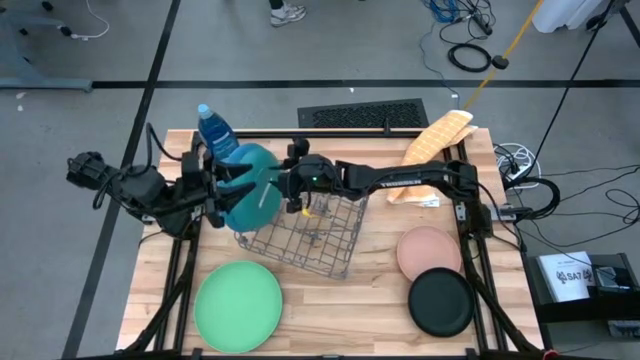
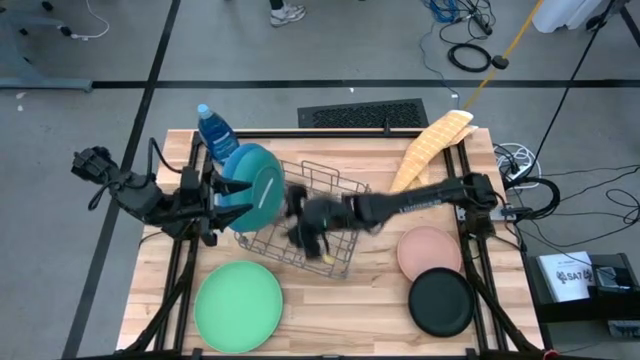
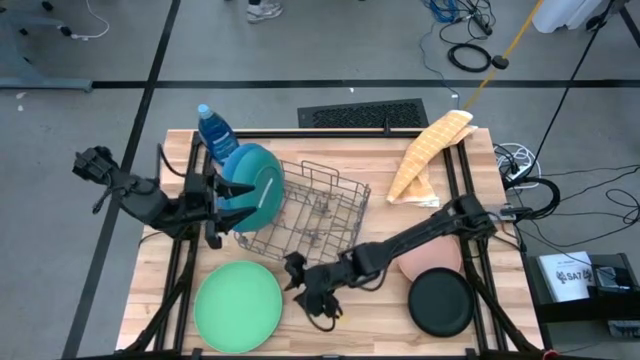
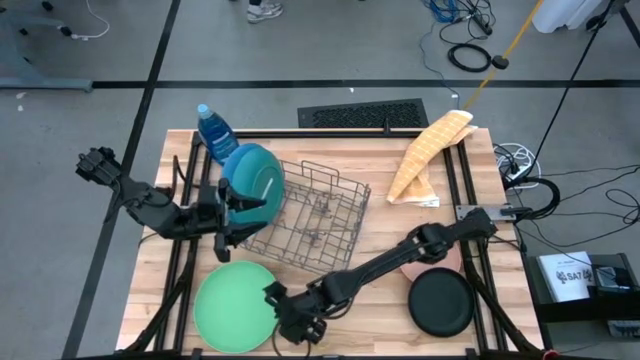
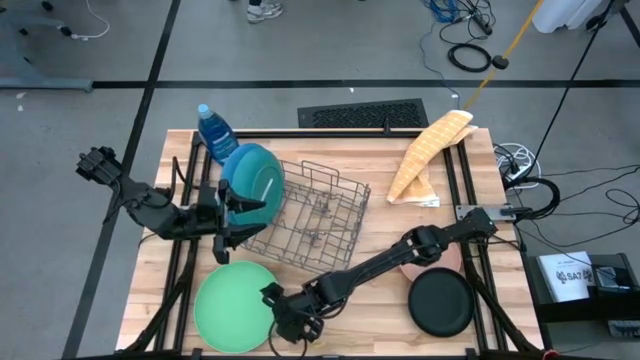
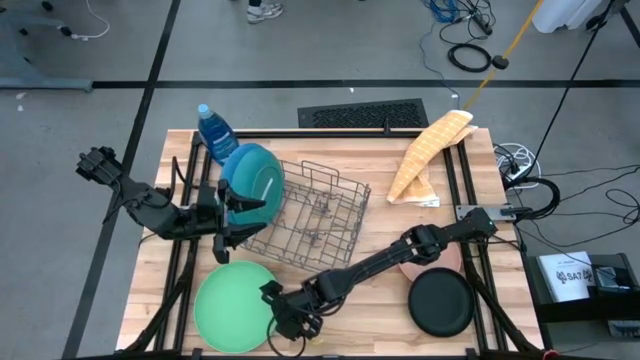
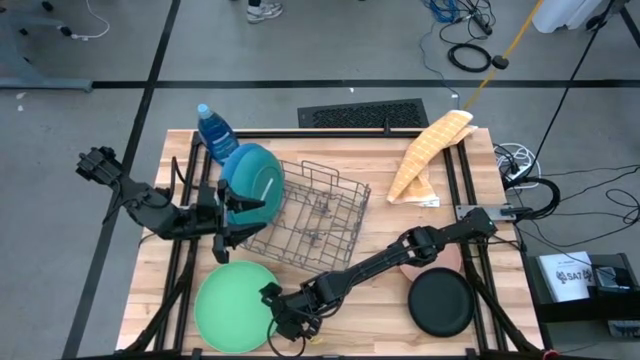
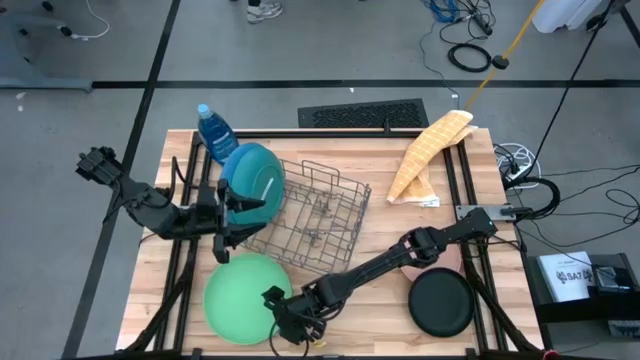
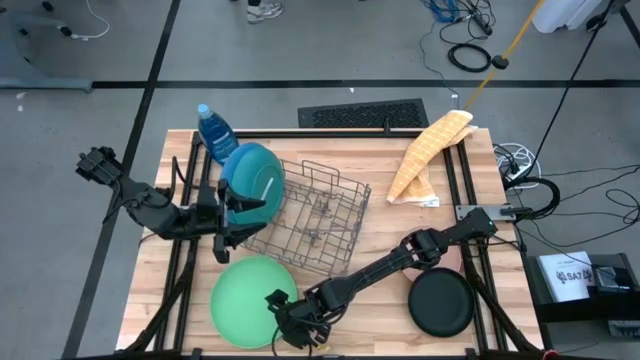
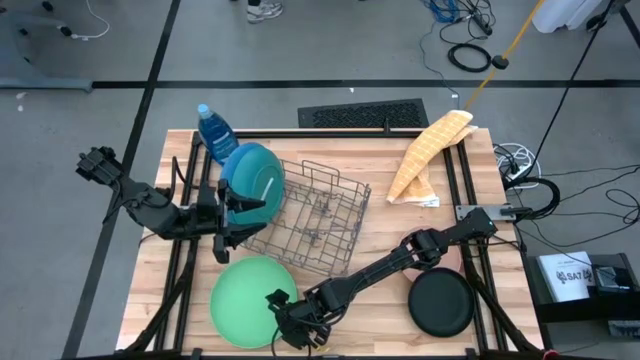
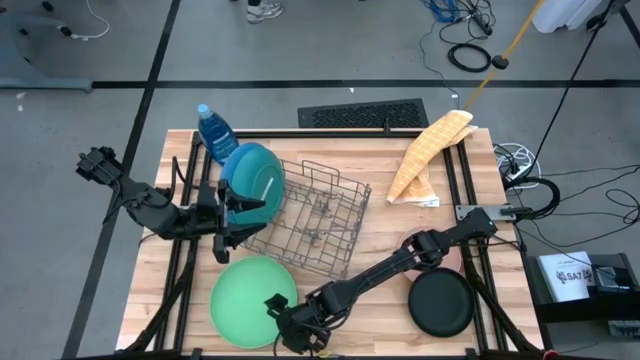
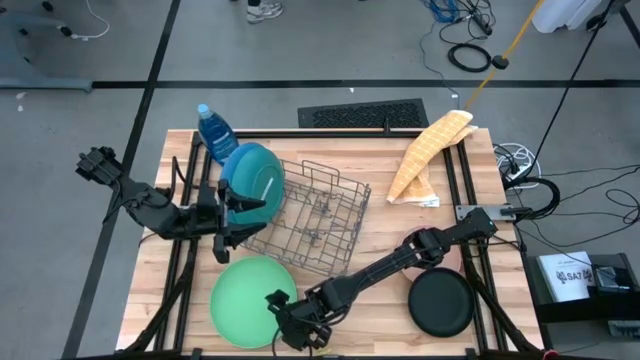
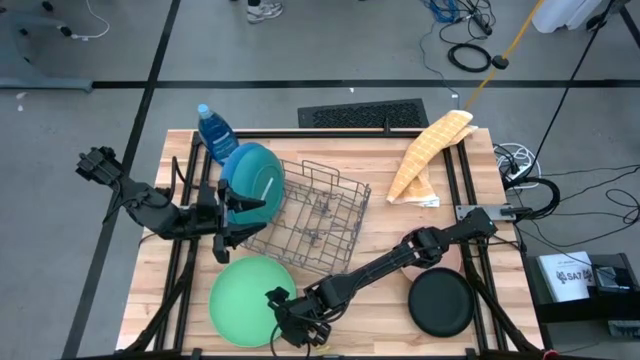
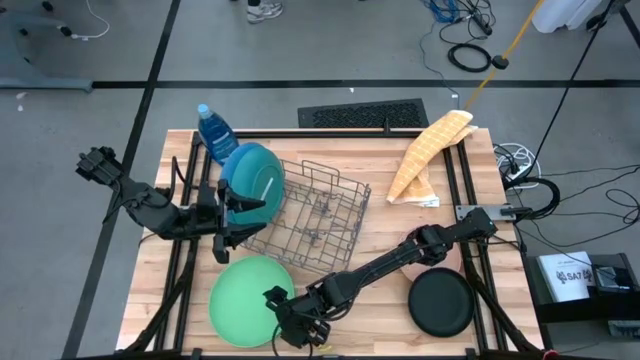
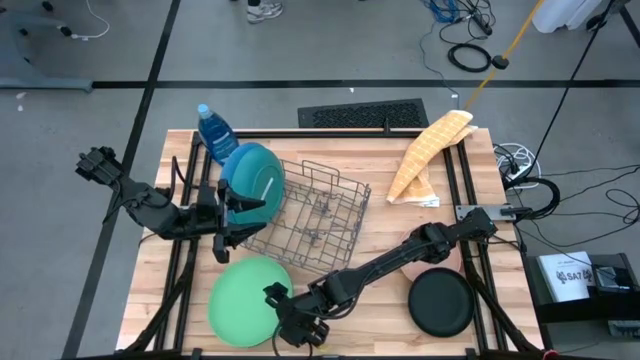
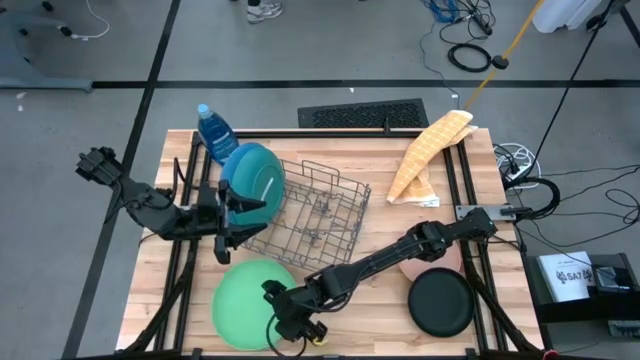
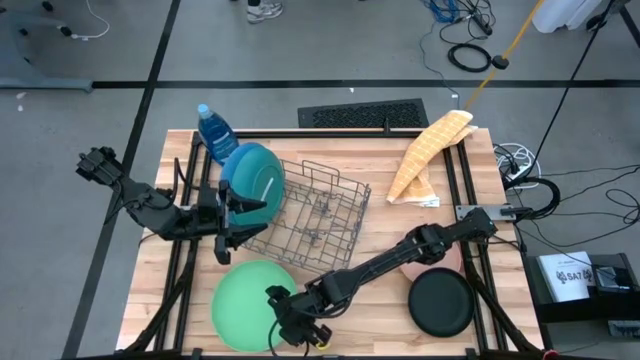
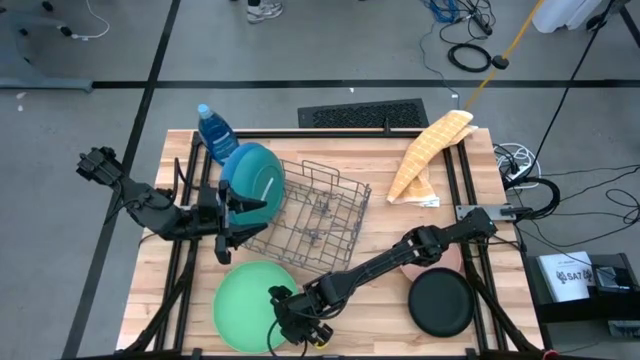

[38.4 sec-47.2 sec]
Task: Sort dishes
Put the light green plate into the dish rack

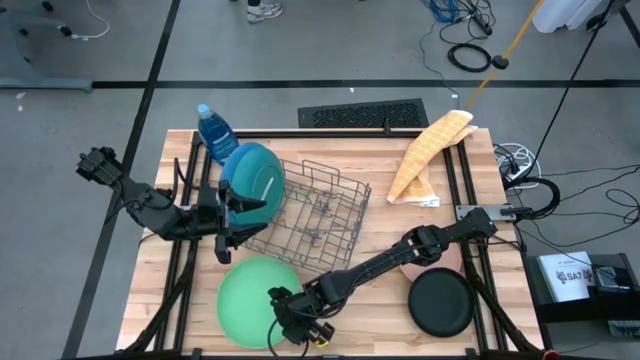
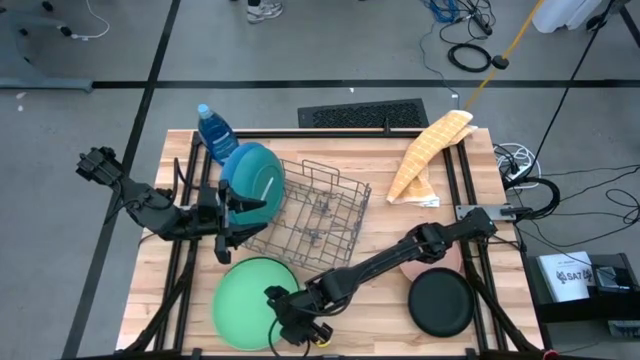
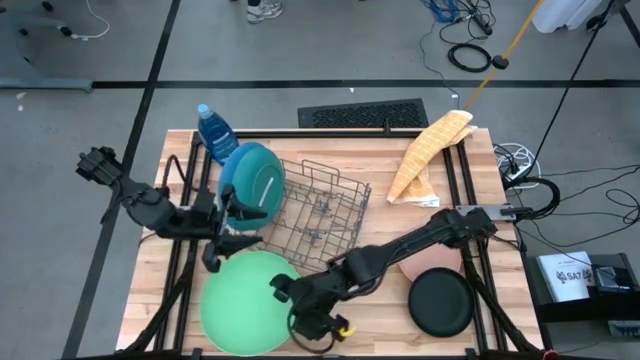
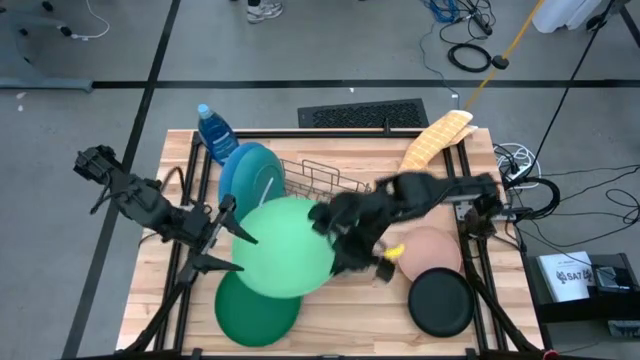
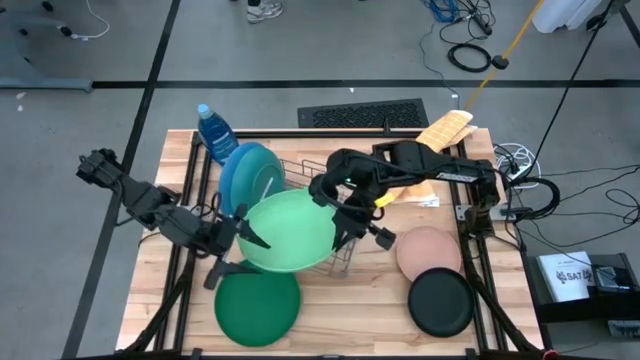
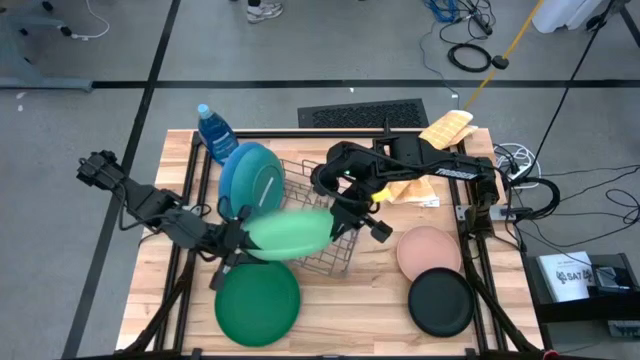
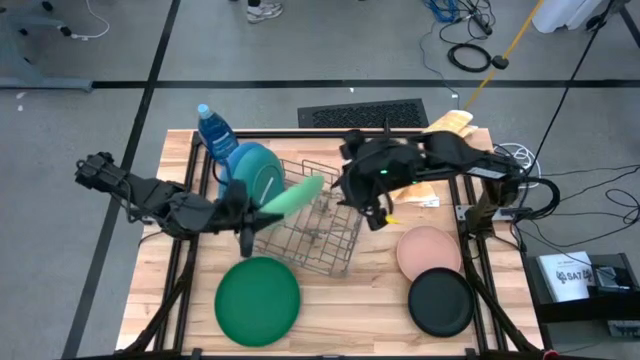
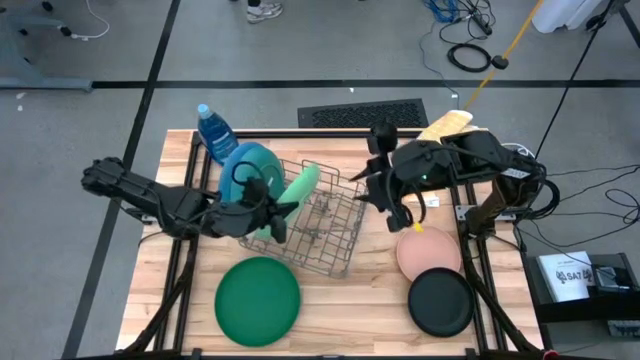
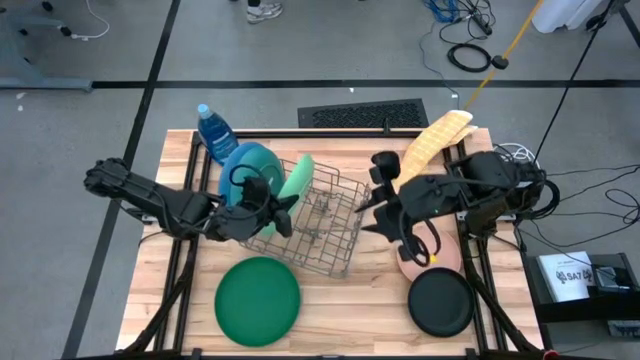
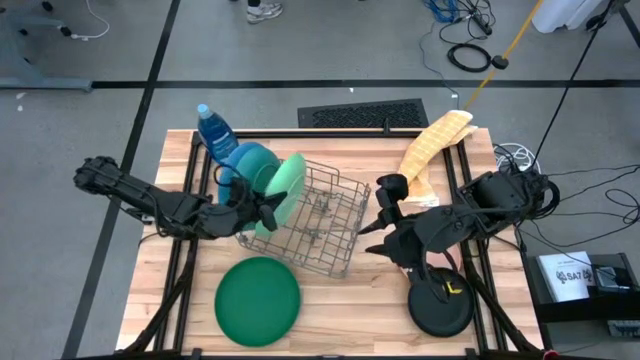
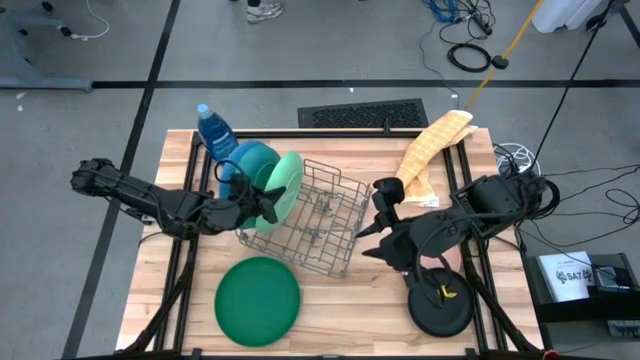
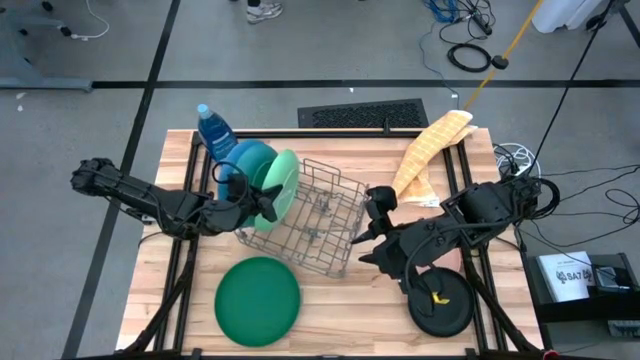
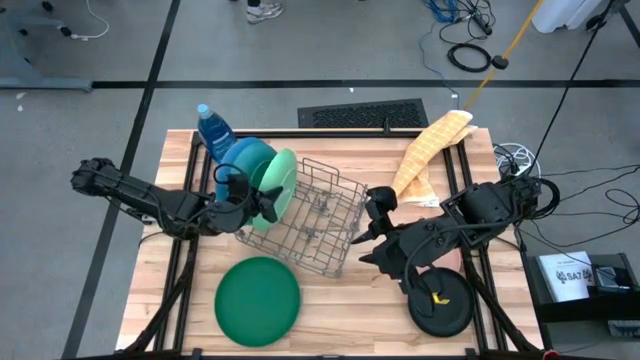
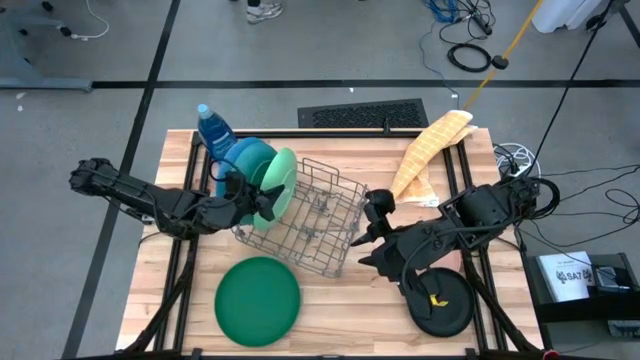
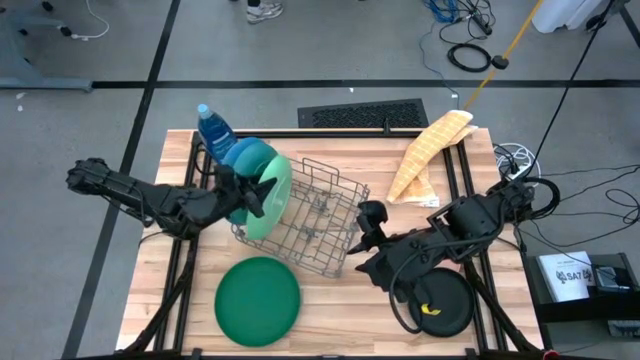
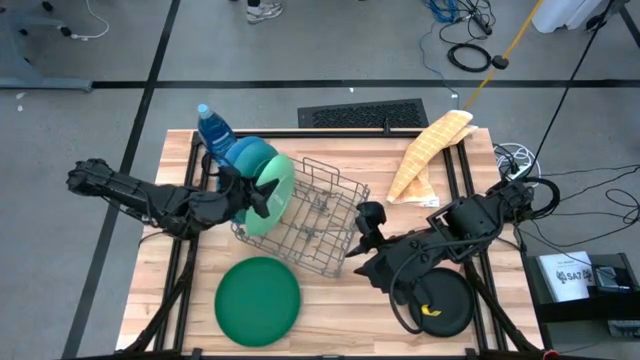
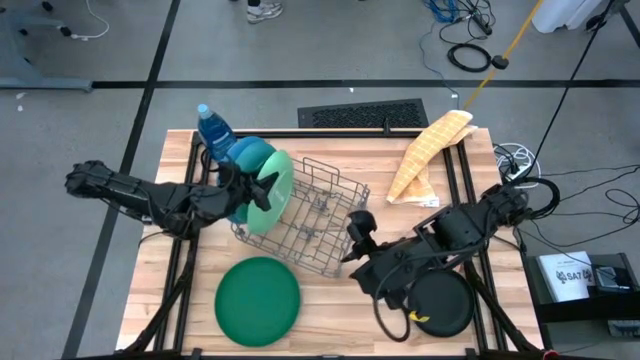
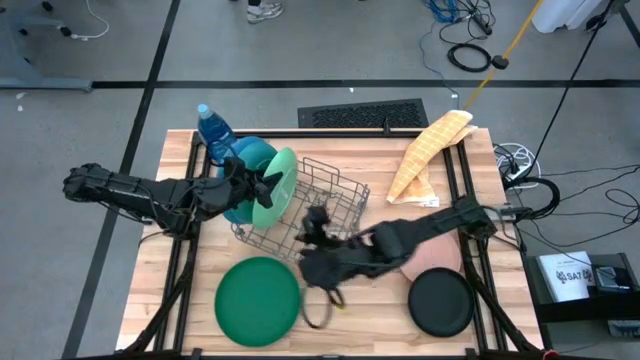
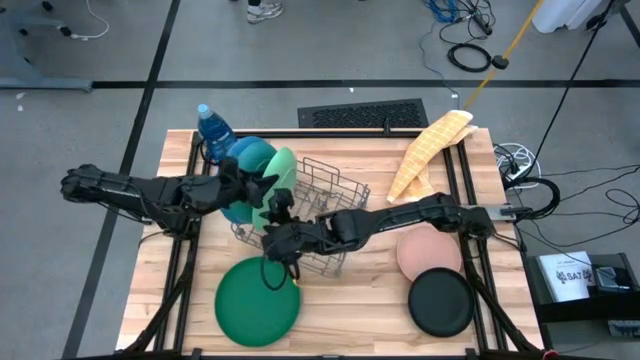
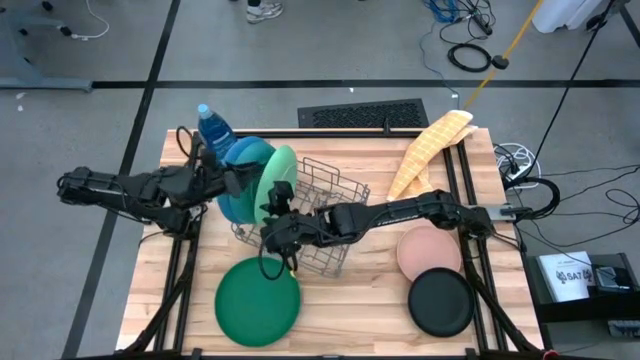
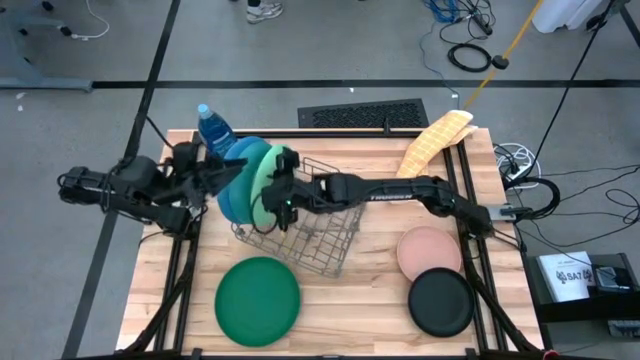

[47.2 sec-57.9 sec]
Put the light green plate into the dish rack

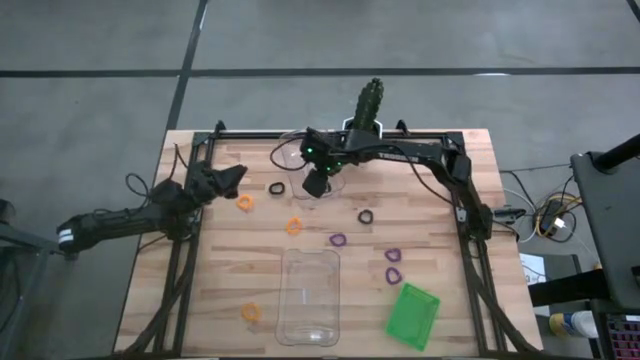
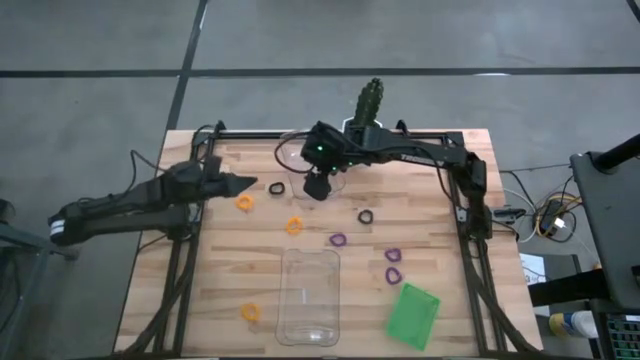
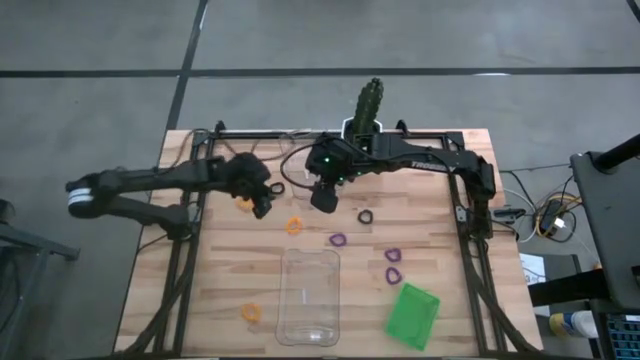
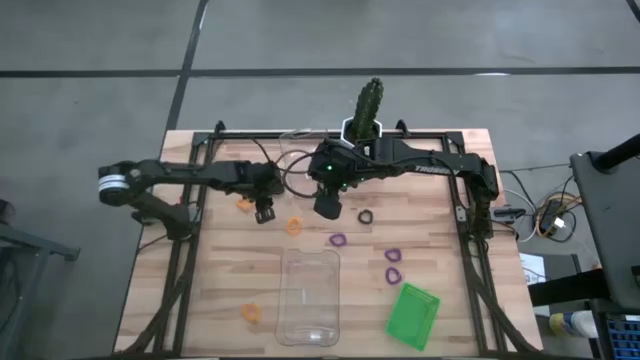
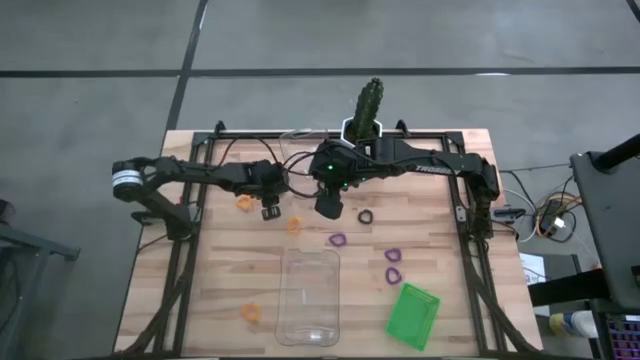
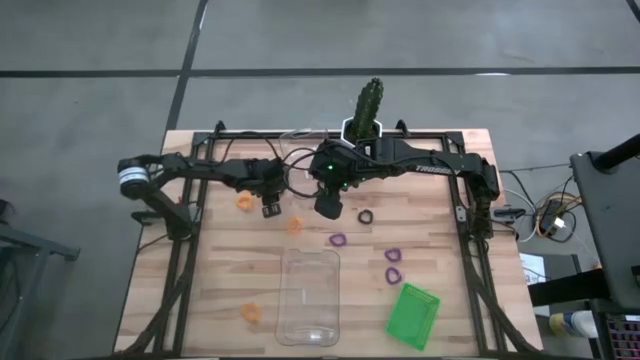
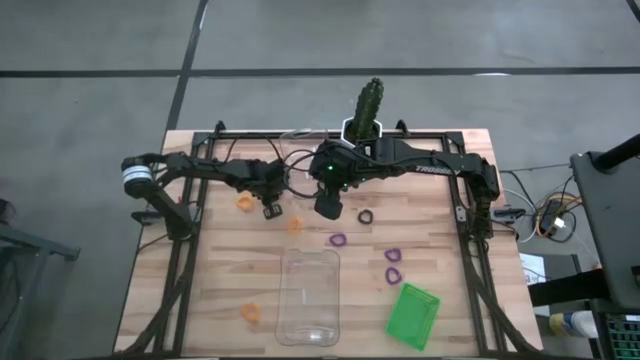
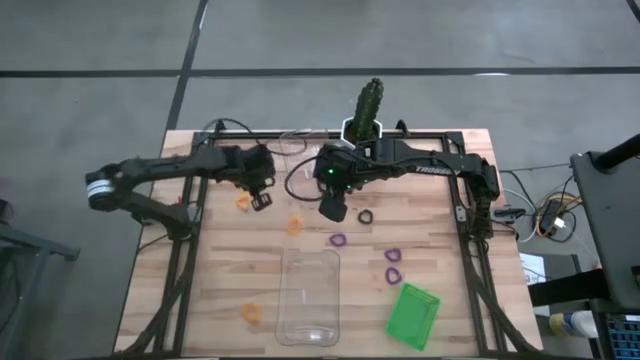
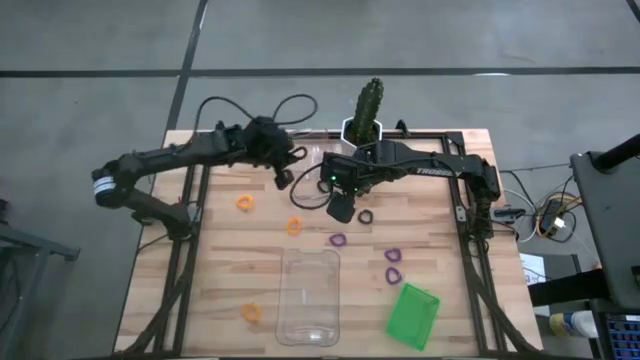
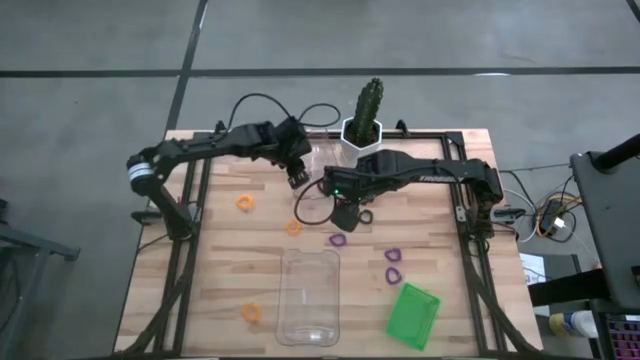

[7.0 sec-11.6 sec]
Task: Sort spring keychains
Put the left black spring keychain into the top transparent bin
